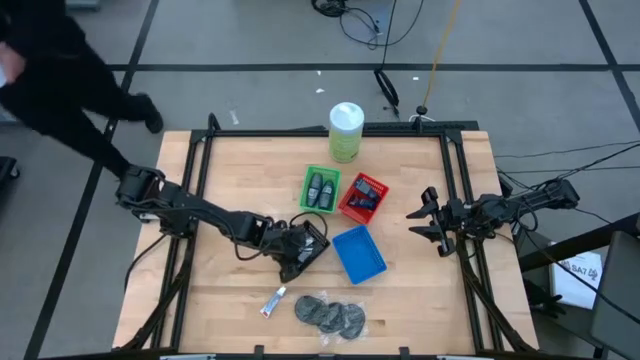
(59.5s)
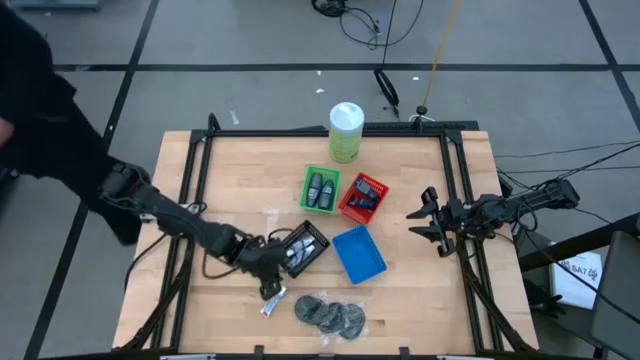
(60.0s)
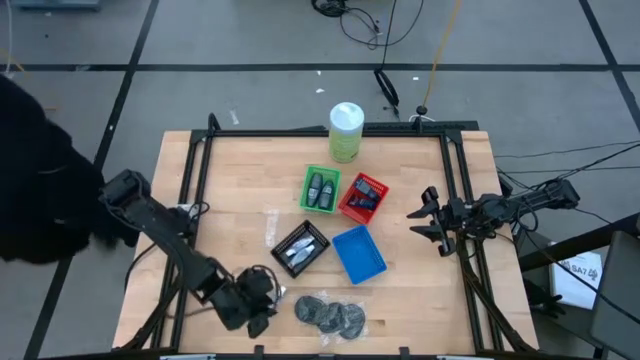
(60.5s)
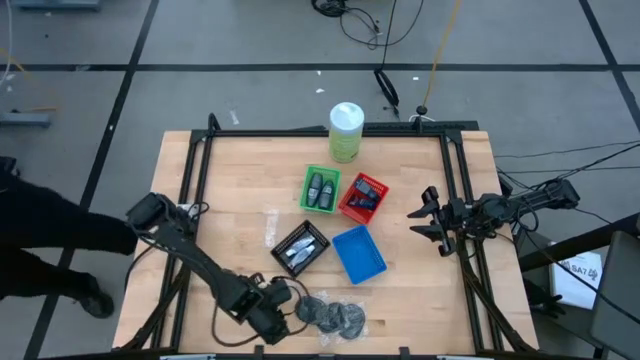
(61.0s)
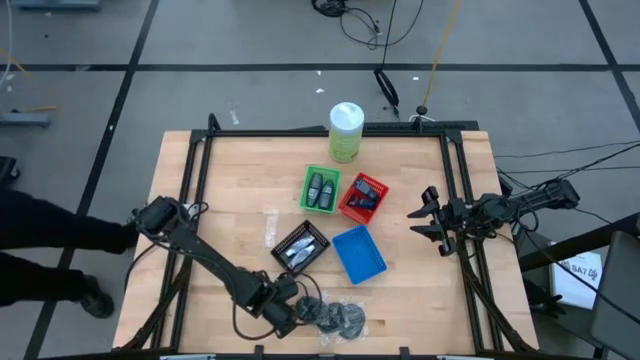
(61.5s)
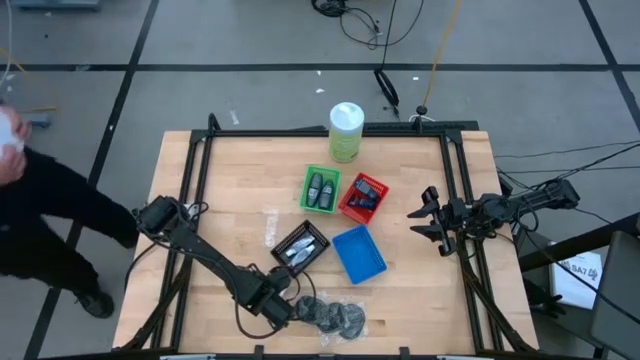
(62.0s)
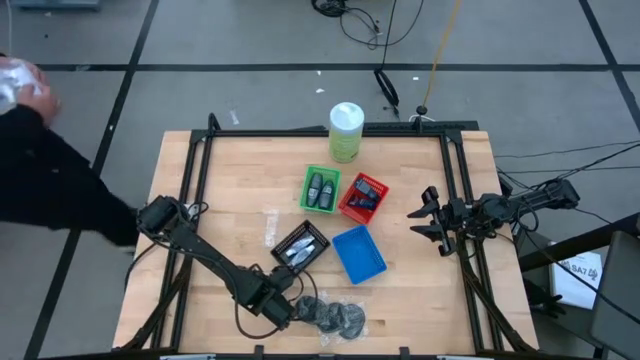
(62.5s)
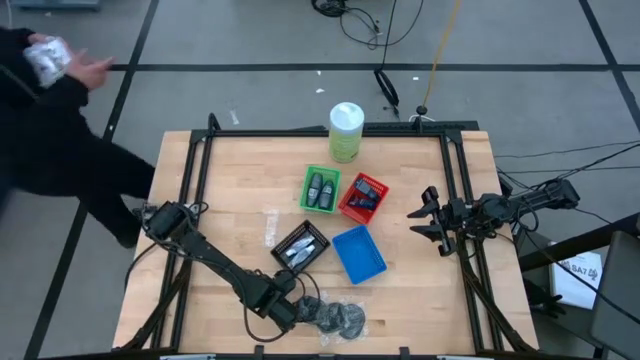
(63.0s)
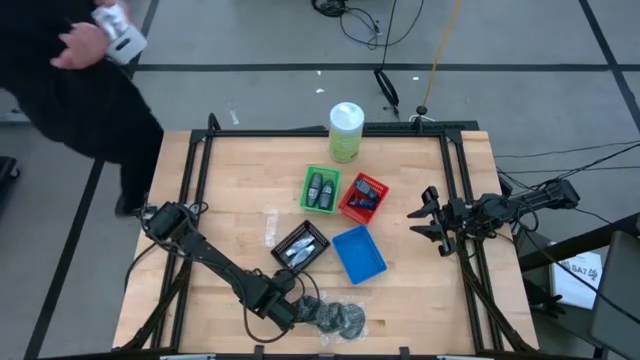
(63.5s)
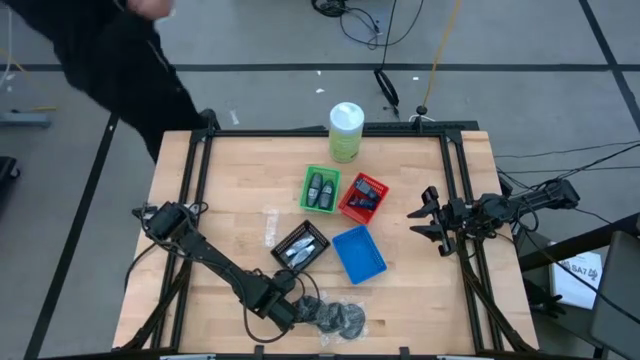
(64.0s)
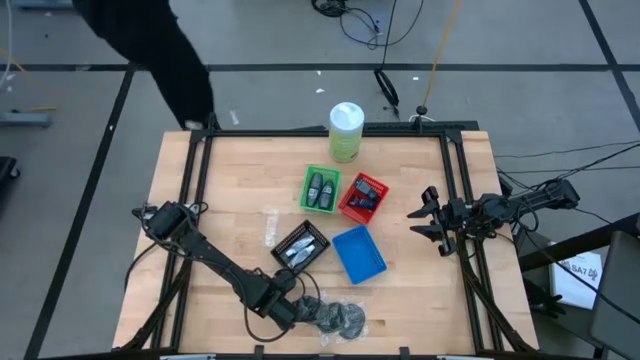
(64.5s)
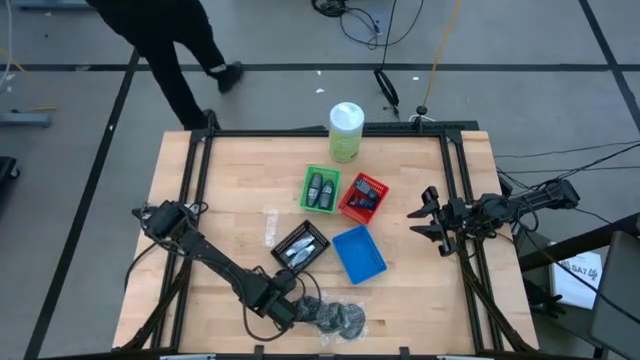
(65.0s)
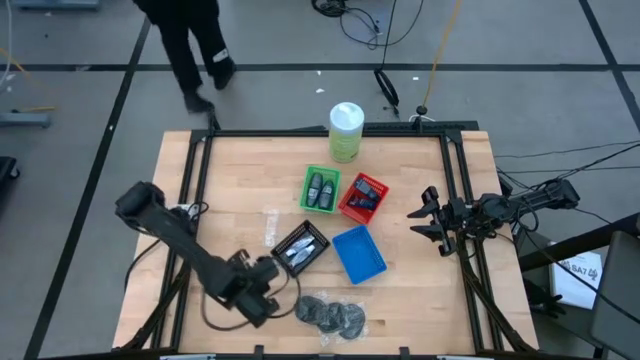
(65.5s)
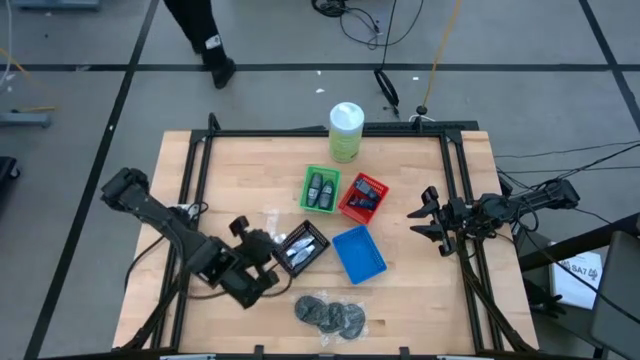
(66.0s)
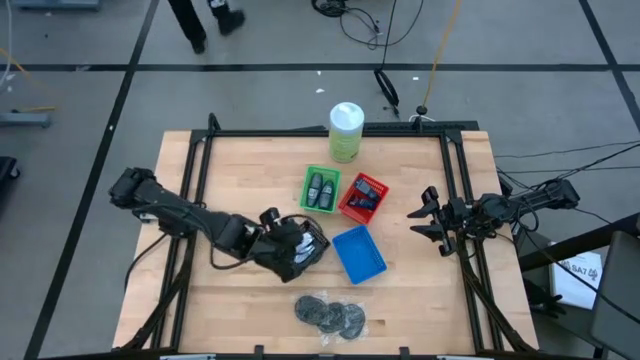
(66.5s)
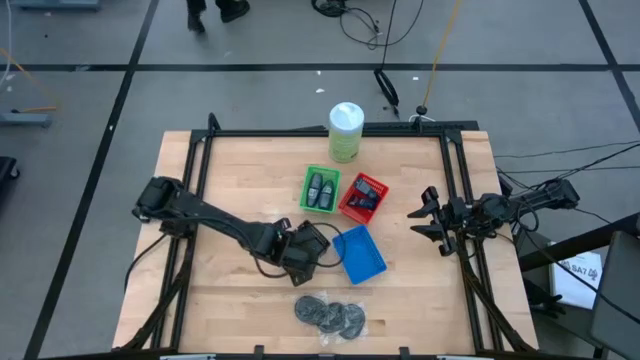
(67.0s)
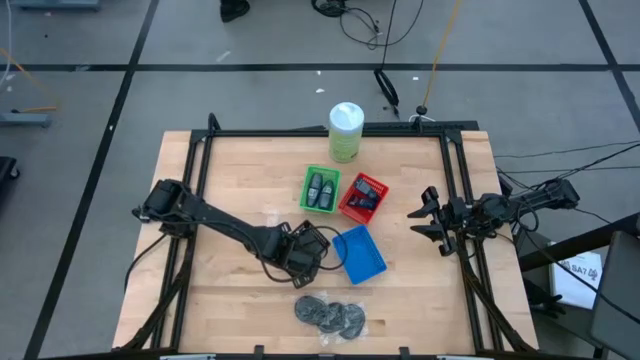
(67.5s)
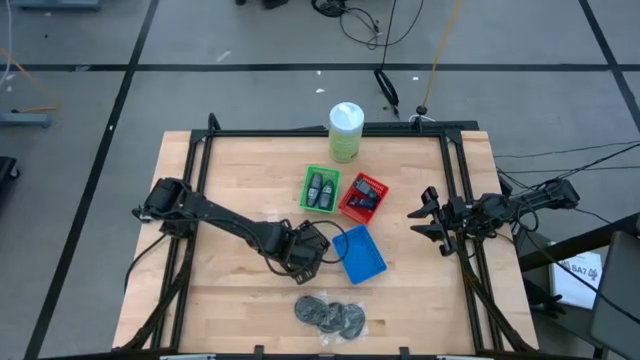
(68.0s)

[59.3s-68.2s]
Task: Pick & Place Travel size toiletries
Put the white toothpaste into the black bin

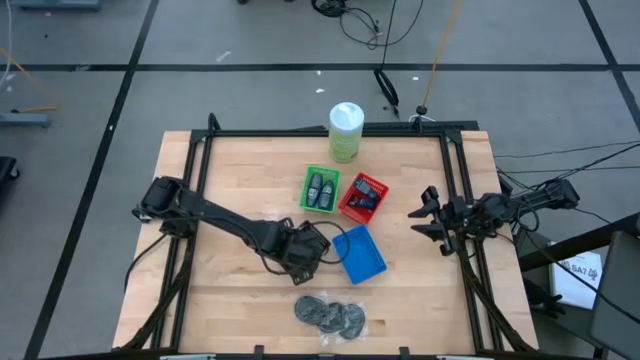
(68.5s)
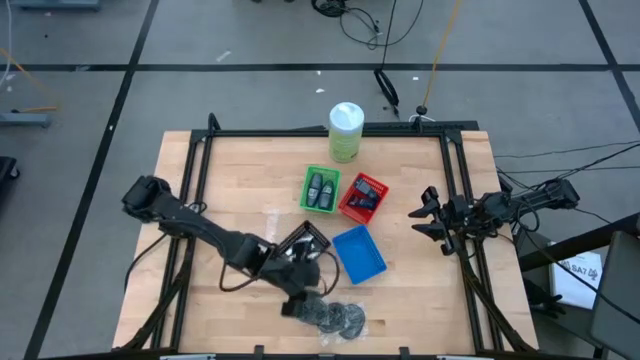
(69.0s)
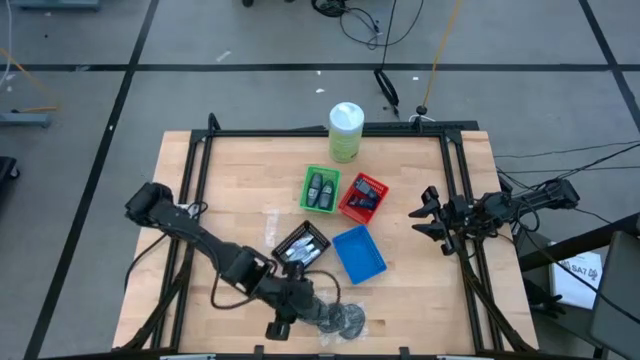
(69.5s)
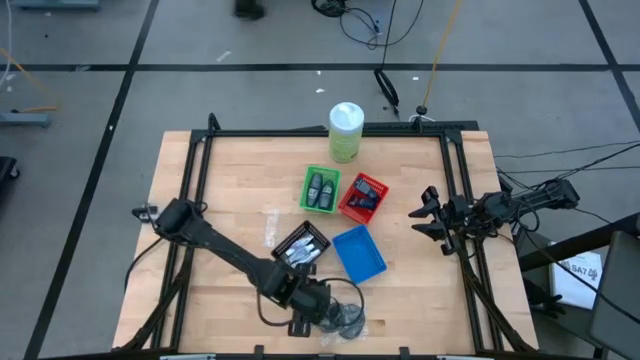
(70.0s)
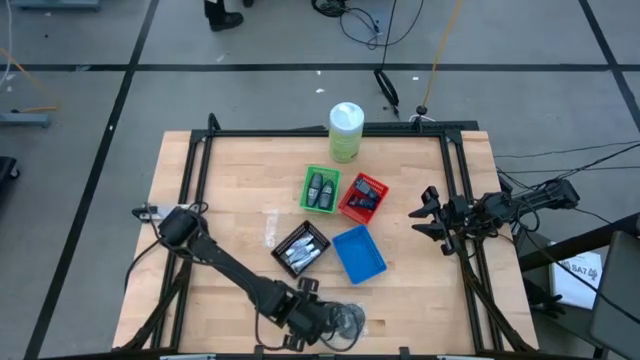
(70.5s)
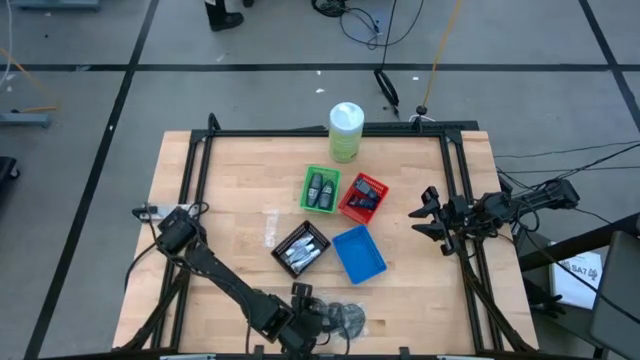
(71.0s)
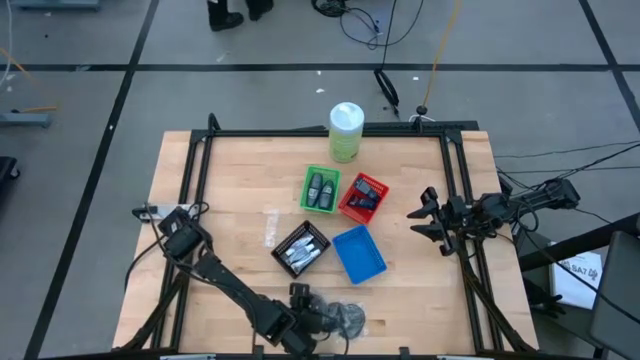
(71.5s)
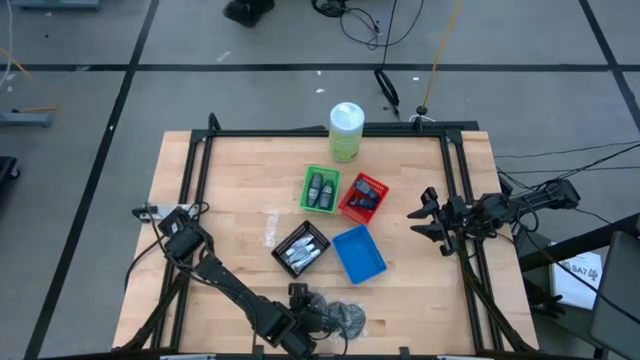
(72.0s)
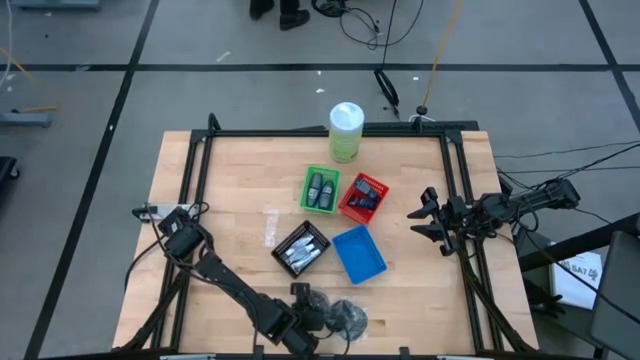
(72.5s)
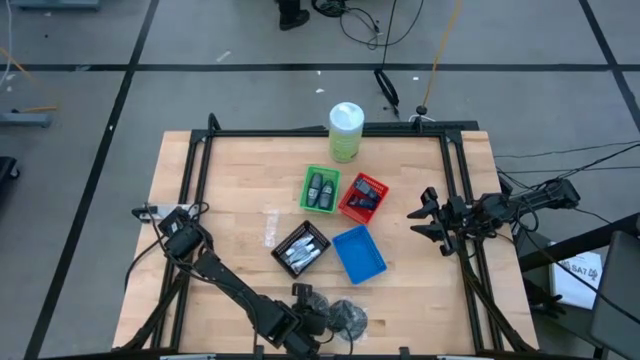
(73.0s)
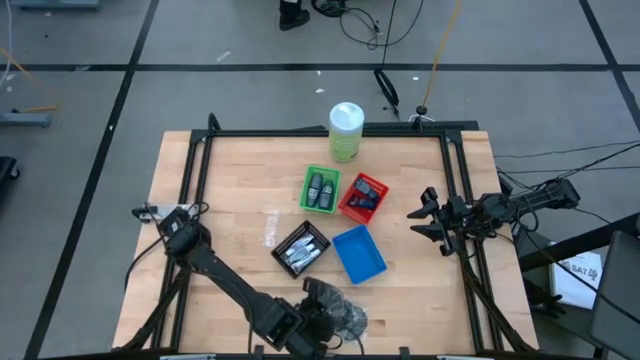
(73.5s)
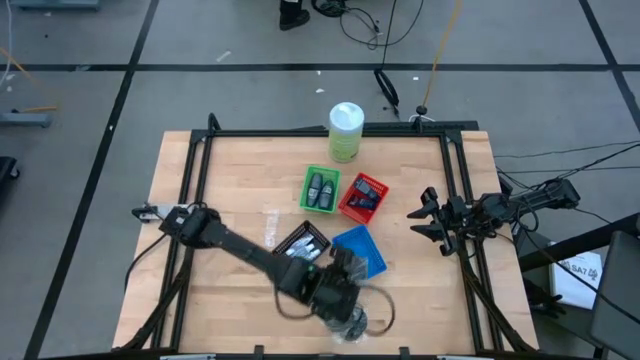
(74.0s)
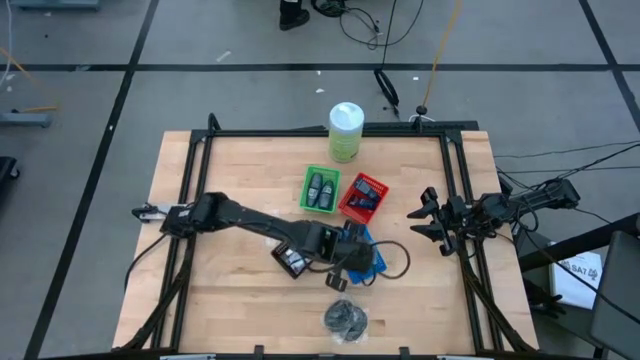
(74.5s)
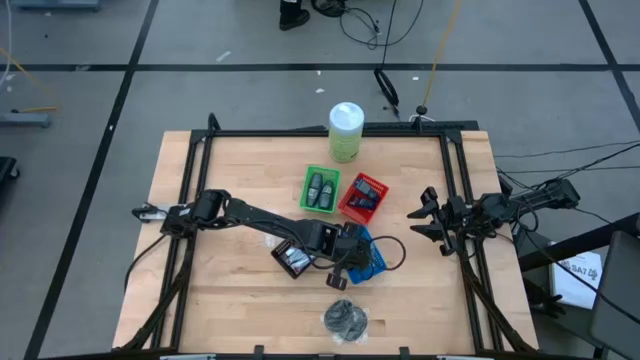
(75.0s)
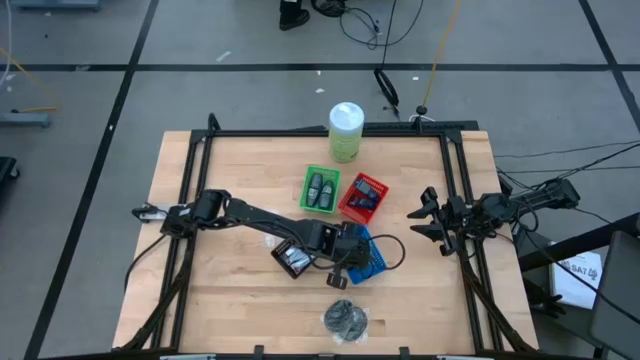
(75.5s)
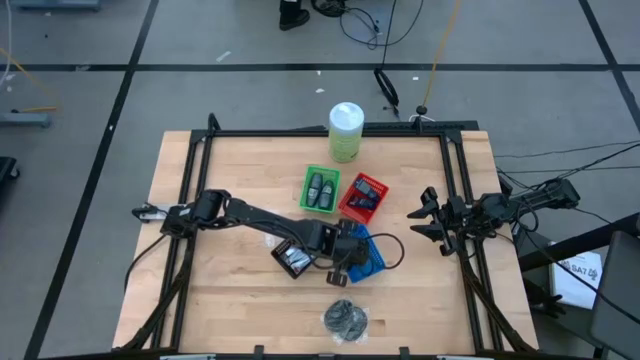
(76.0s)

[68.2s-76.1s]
Put the left black hairbrush into the blue bin

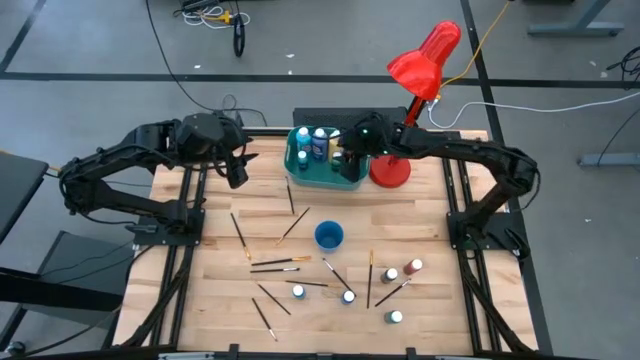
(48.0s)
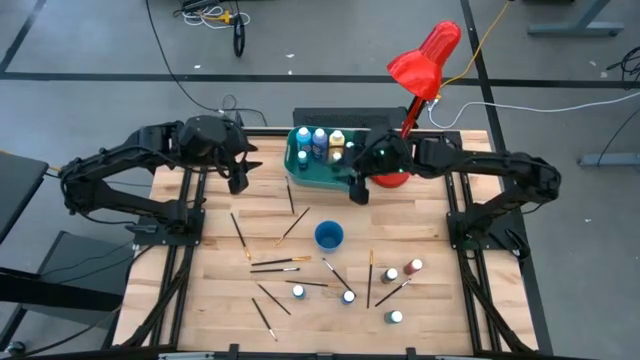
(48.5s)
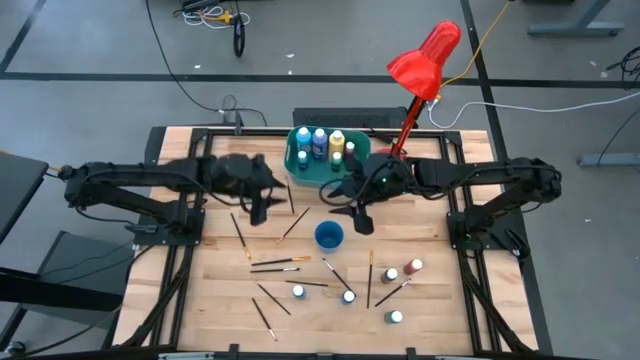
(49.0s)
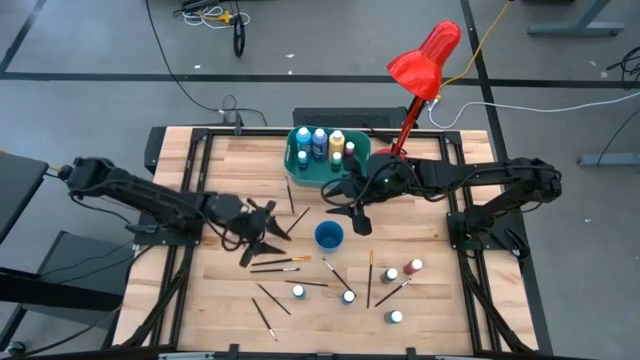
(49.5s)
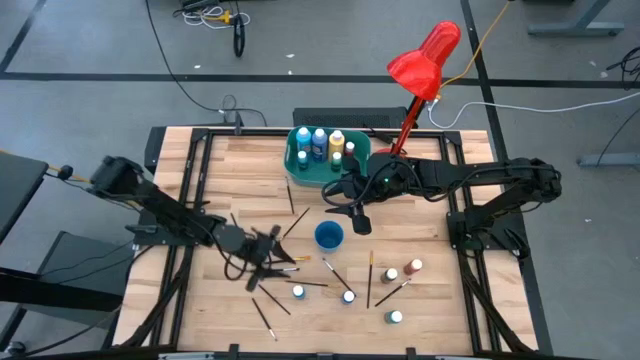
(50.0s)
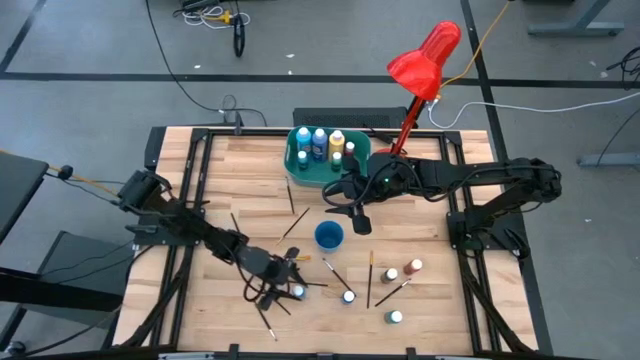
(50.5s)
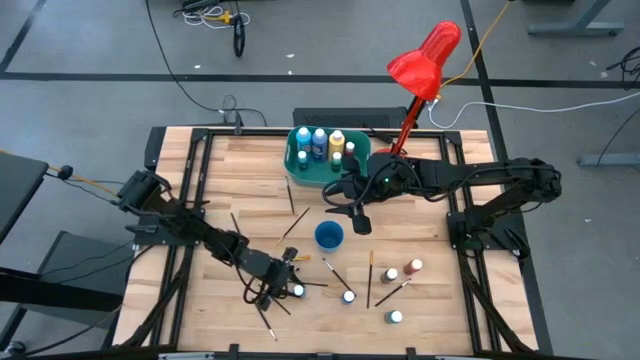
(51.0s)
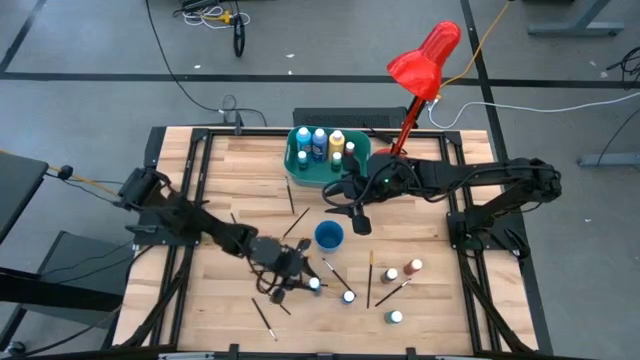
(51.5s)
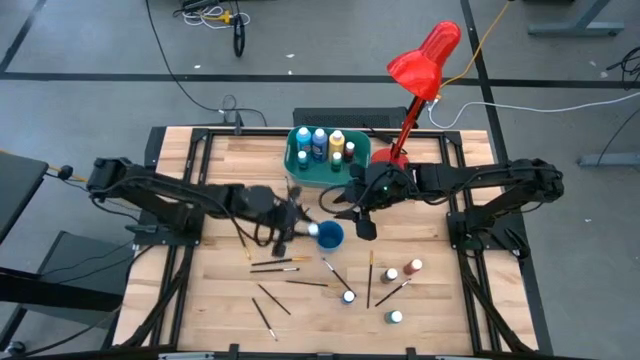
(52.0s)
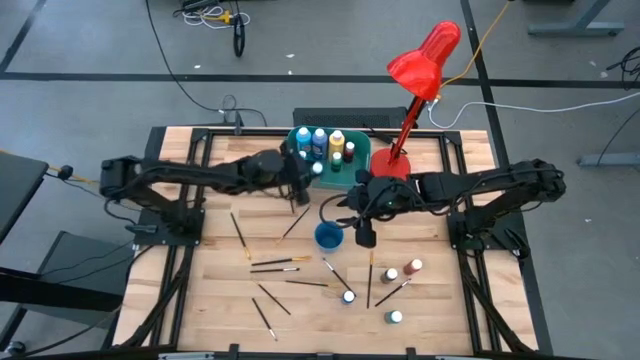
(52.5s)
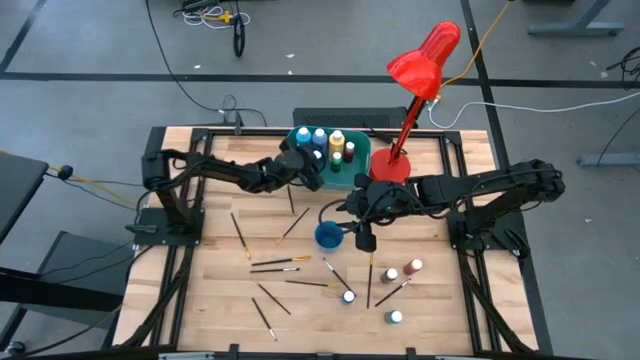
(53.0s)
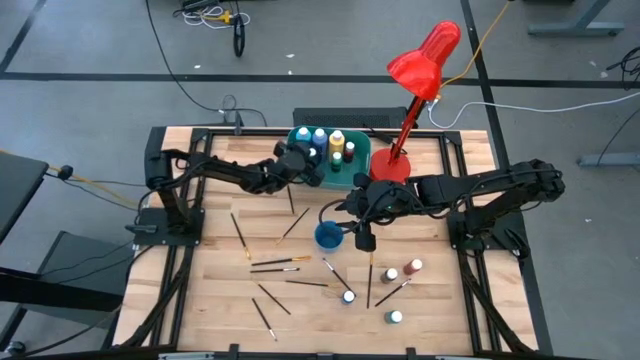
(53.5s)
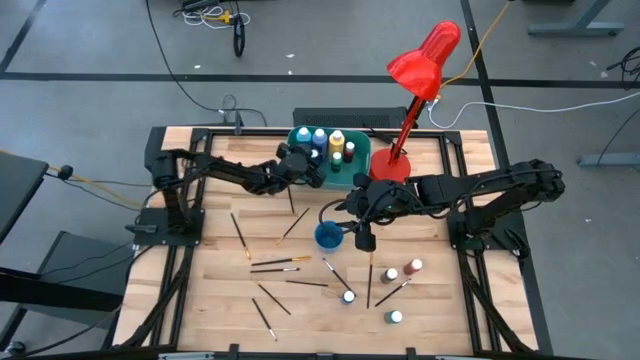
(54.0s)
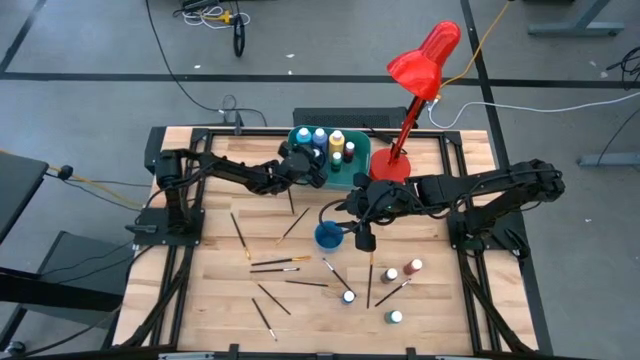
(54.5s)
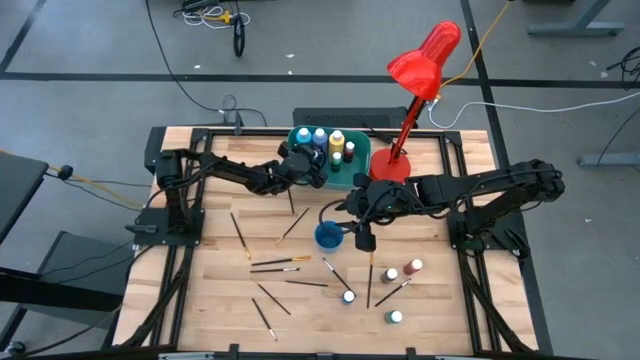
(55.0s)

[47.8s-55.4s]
Task: Pick & Place Paint Supplies
Put the blue paint bottle into the green bin
